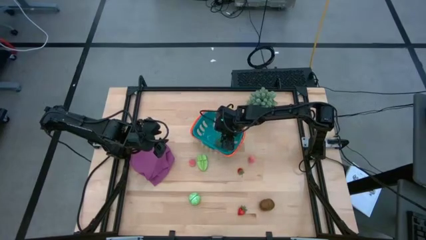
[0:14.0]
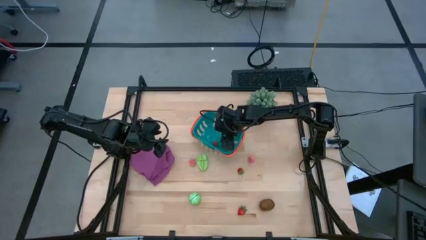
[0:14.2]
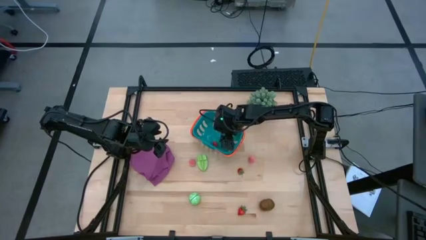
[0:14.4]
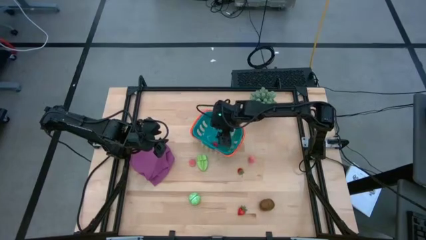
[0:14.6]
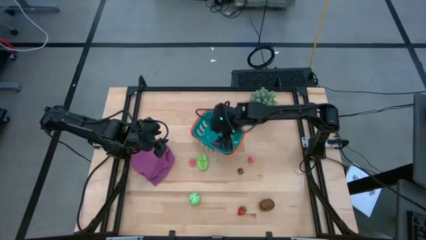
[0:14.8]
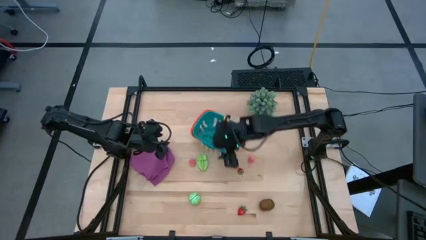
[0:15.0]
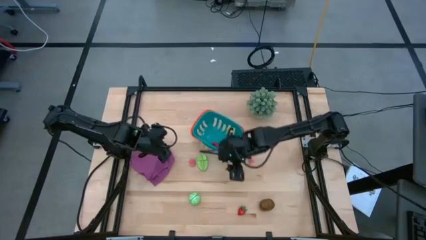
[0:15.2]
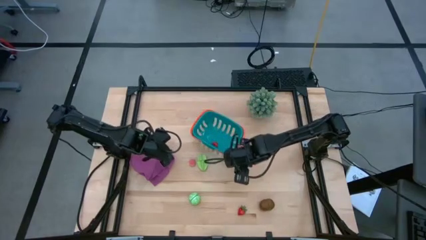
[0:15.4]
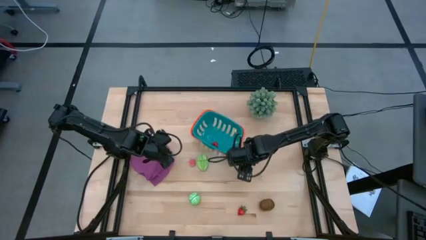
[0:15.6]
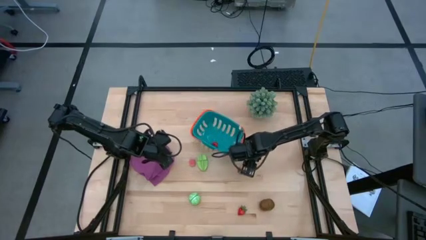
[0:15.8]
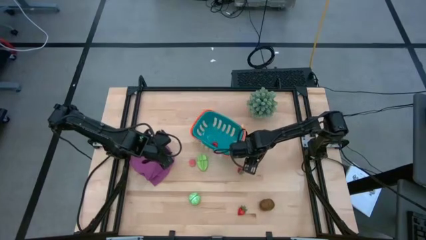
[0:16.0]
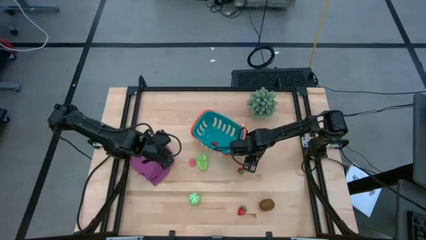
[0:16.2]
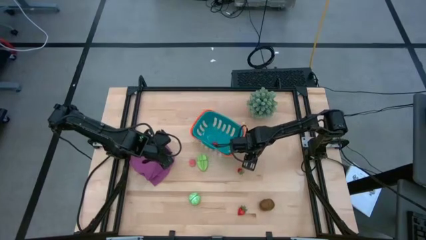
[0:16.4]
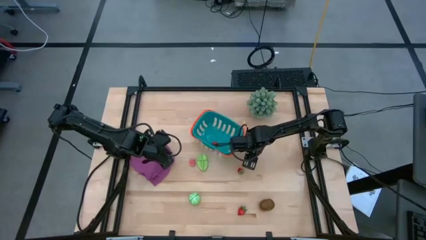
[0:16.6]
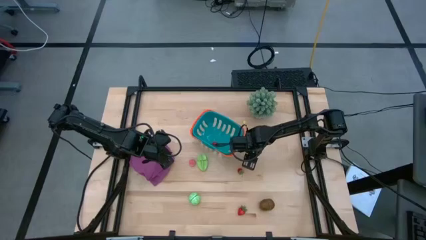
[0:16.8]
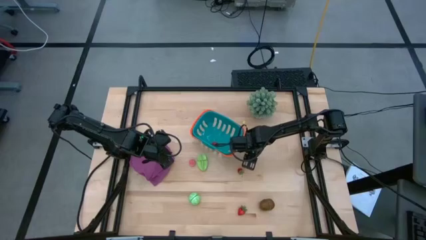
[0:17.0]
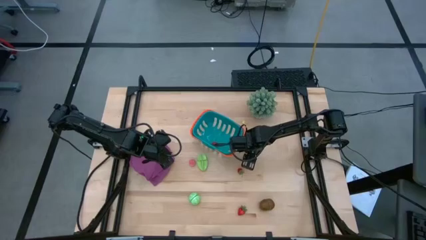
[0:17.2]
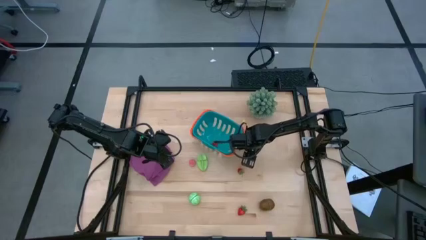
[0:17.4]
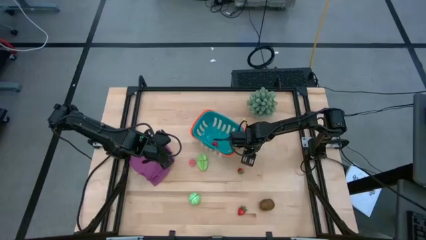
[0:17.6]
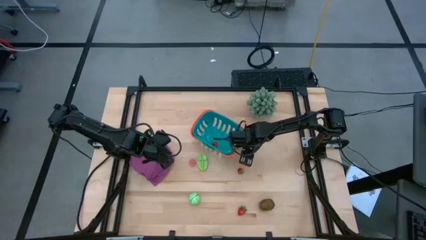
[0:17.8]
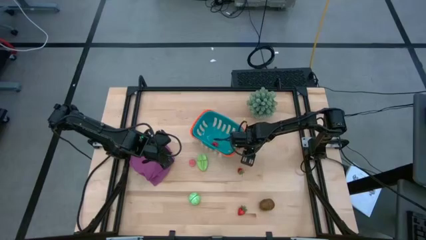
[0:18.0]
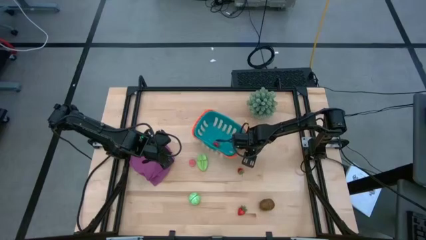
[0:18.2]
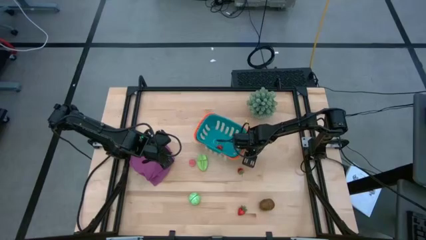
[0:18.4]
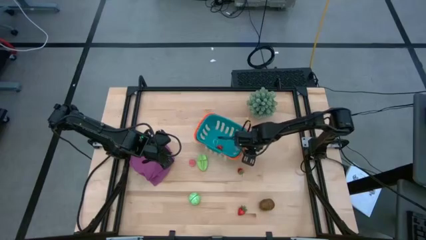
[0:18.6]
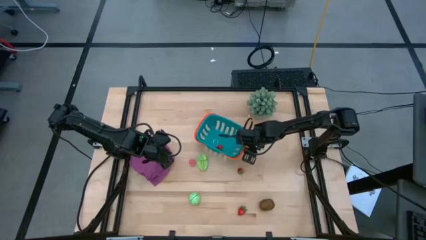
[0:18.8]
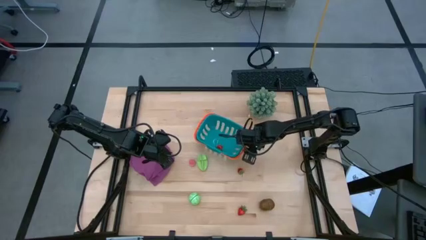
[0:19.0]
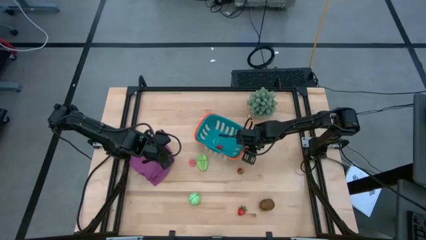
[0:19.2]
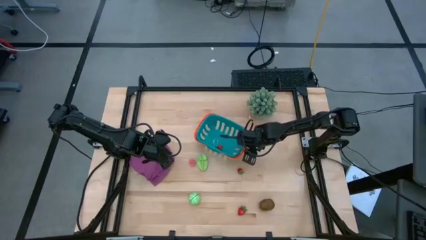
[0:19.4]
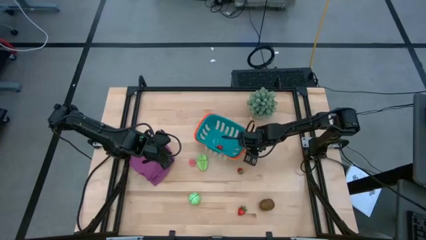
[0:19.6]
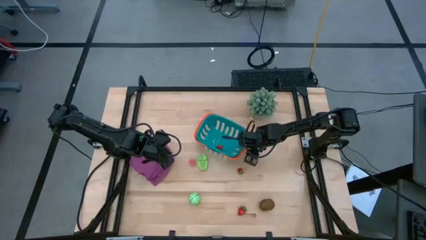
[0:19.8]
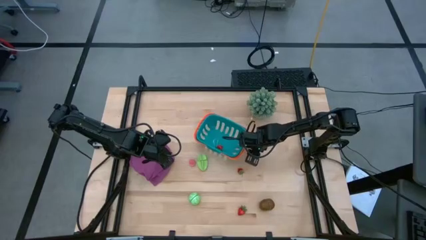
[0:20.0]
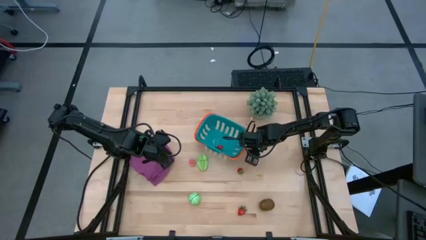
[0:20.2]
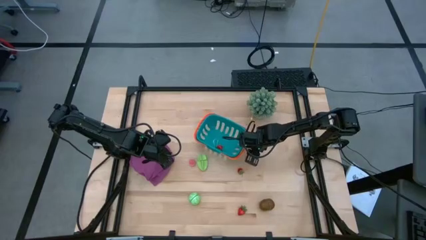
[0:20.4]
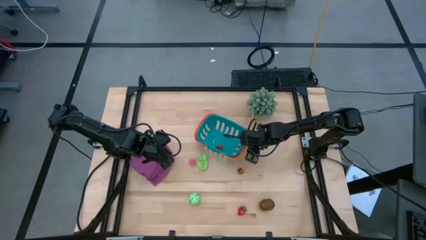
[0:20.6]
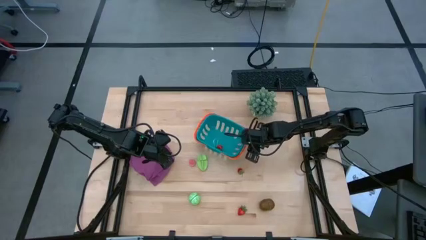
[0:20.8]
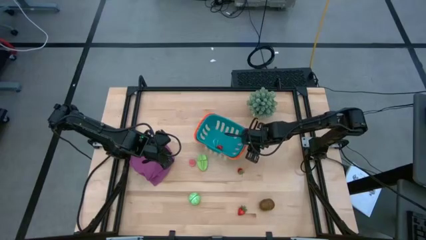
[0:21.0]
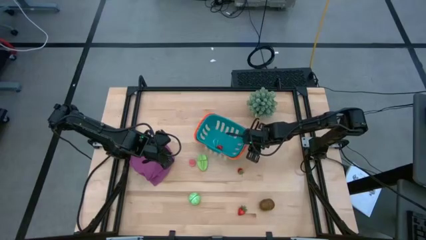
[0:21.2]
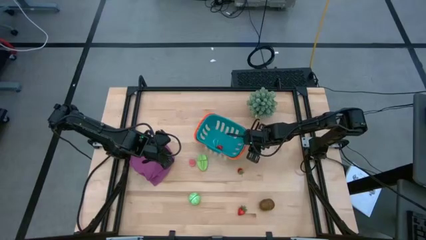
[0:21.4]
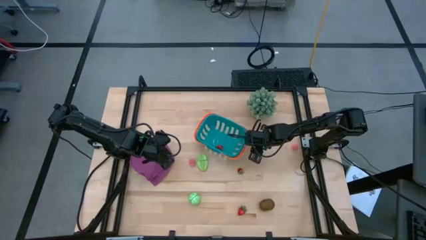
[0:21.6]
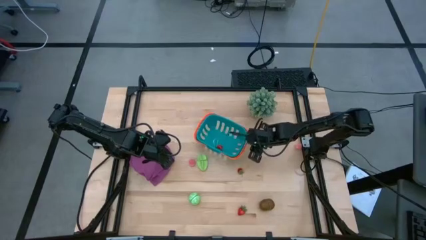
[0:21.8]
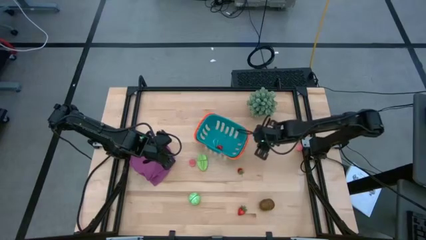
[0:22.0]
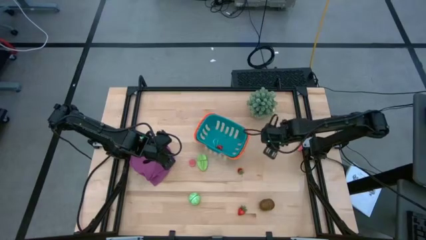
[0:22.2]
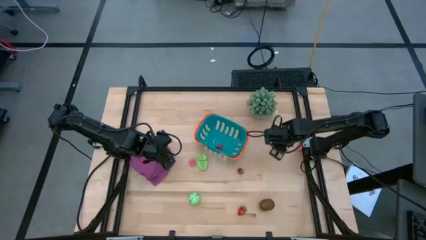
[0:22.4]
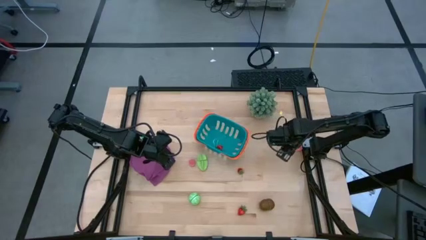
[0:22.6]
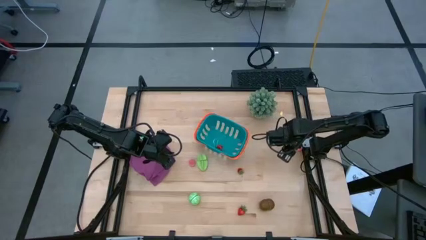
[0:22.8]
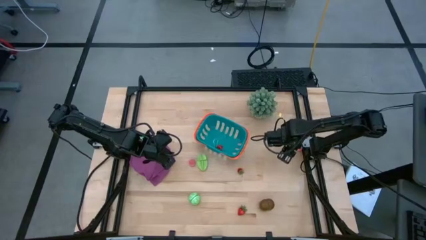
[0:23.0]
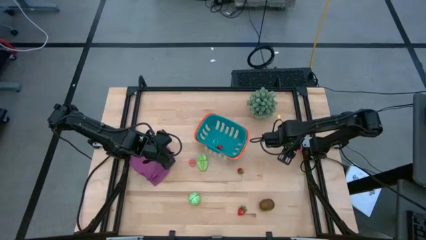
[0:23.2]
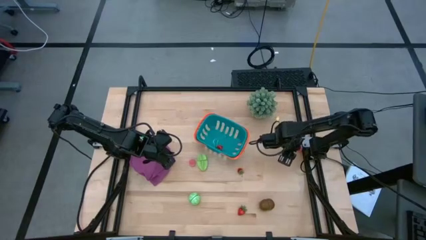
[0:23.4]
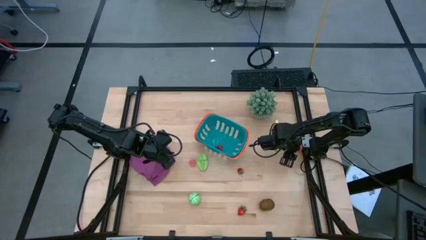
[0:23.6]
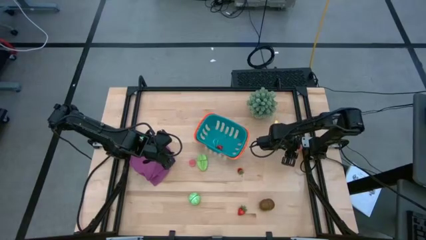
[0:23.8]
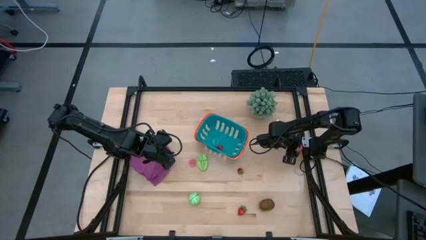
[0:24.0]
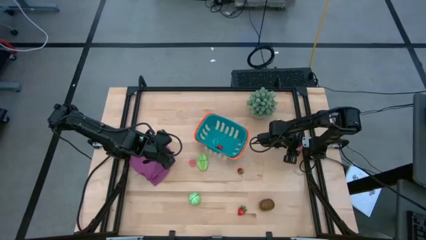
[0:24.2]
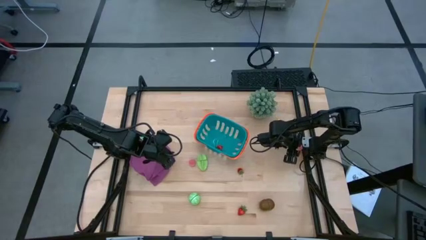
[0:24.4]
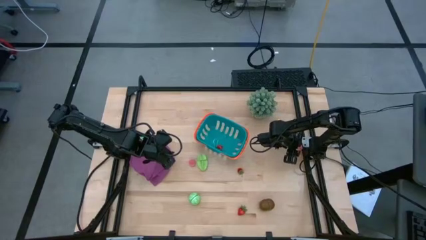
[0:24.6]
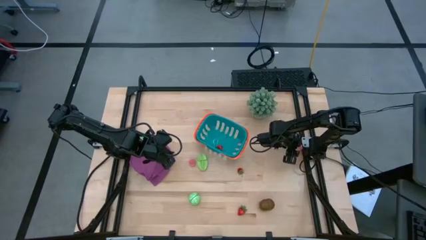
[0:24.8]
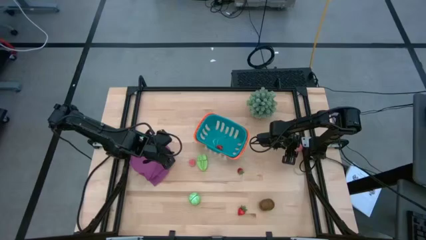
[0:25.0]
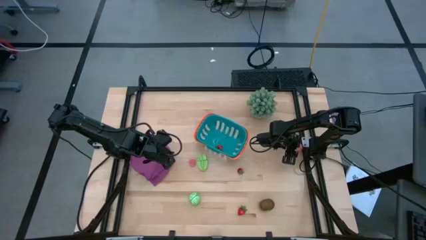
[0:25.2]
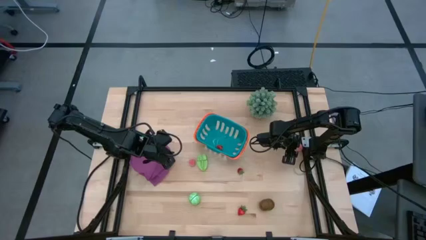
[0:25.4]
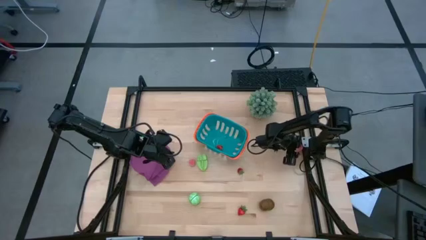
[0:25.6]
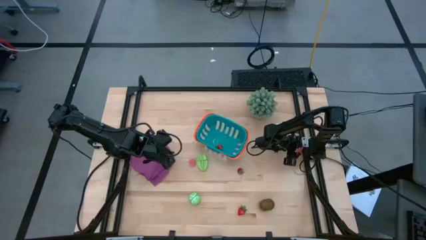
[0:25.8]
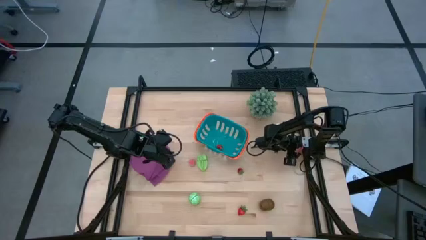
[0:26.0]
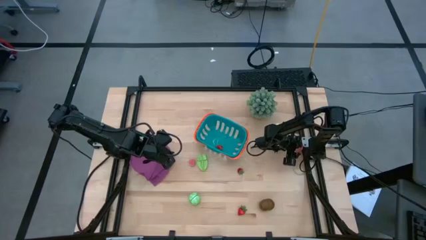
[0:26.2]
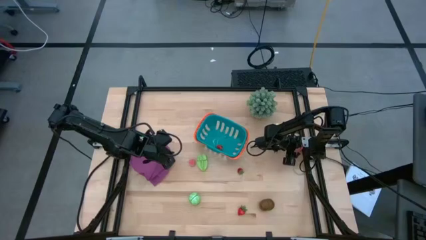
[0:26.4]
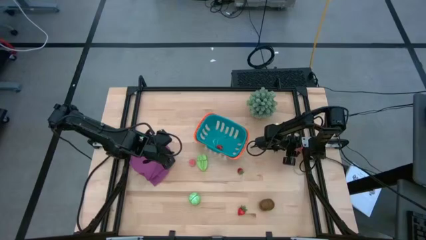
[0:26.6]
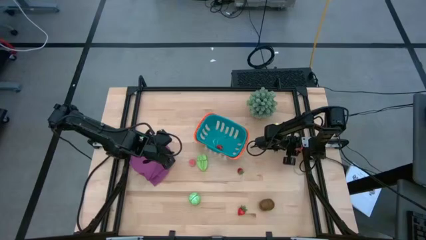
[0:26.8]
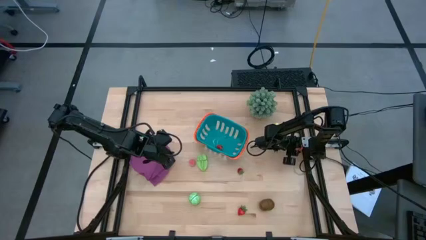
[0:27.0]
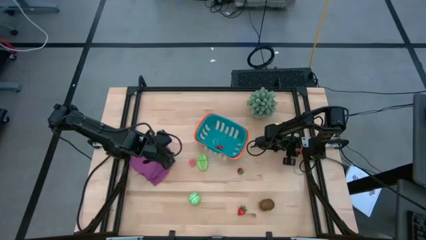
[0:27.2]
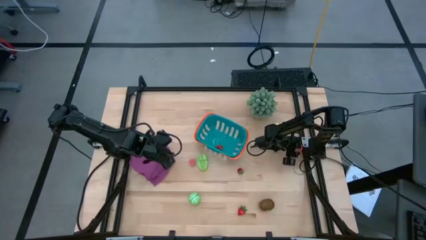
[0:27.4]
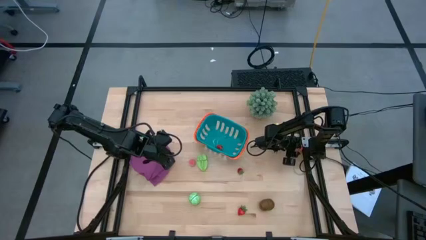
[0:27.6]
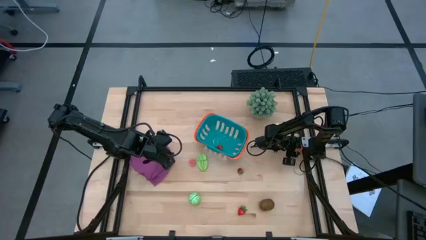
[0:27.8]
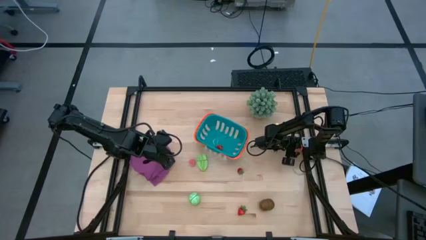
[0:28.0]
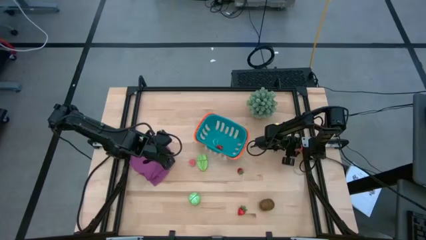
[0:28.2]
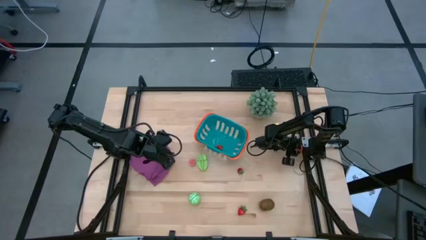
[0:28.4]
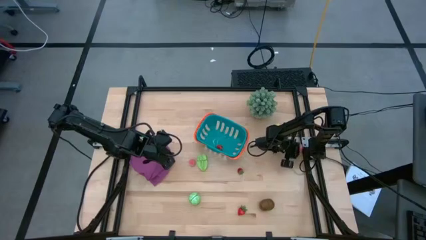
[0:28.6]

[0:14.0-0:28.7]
Task: Pick and placing Produce into tupperware
Put the right pink peach into the blue basket
